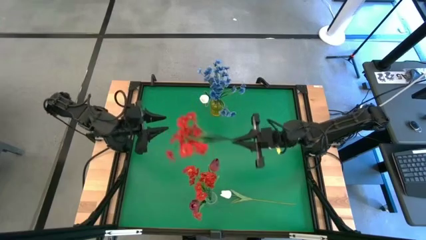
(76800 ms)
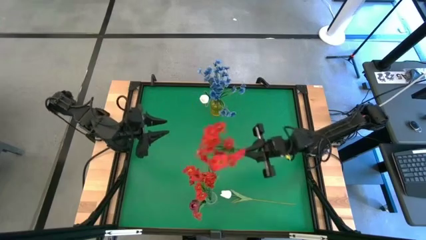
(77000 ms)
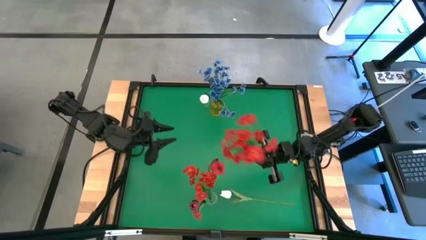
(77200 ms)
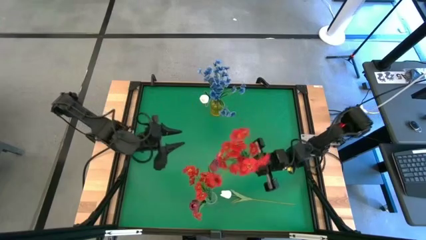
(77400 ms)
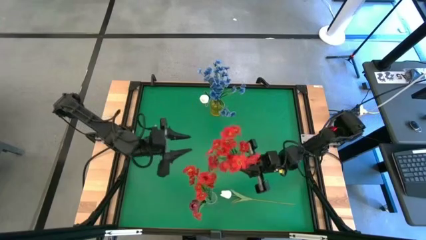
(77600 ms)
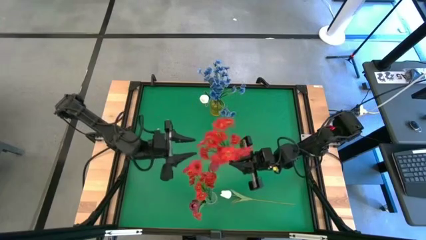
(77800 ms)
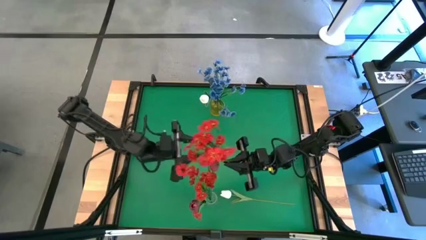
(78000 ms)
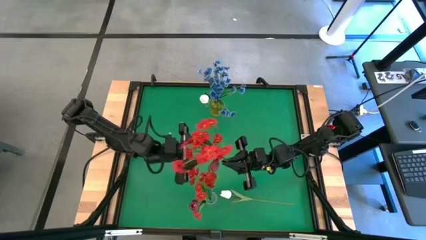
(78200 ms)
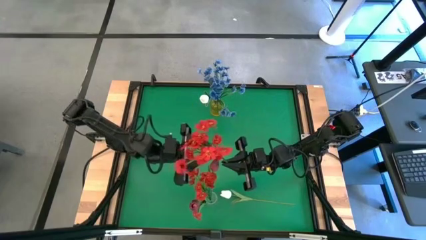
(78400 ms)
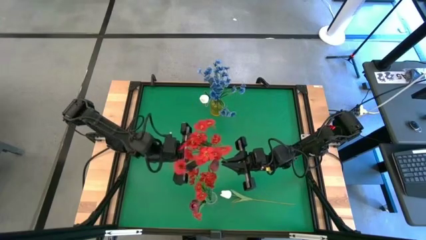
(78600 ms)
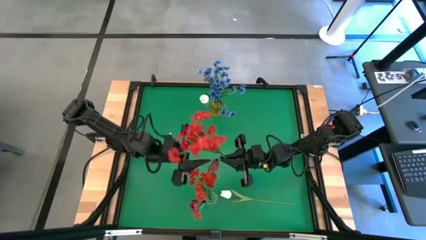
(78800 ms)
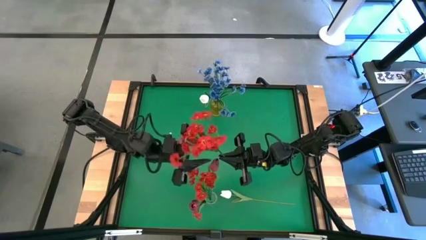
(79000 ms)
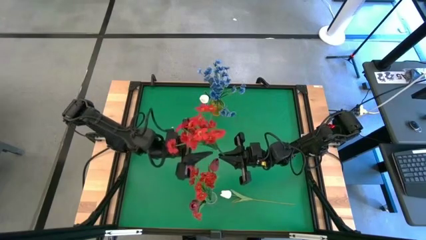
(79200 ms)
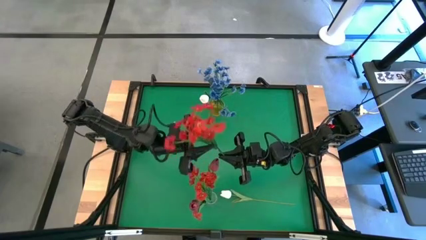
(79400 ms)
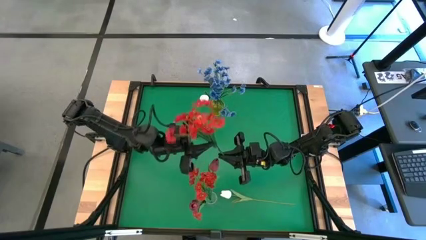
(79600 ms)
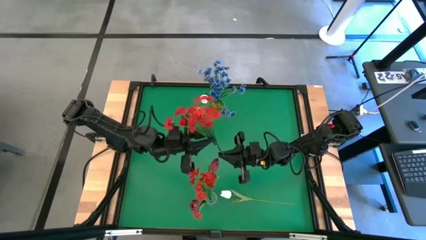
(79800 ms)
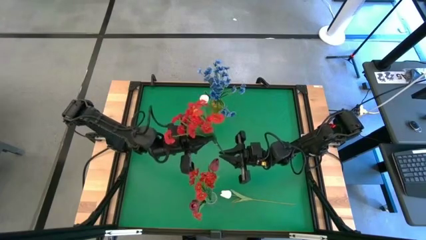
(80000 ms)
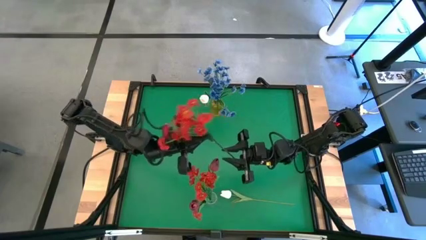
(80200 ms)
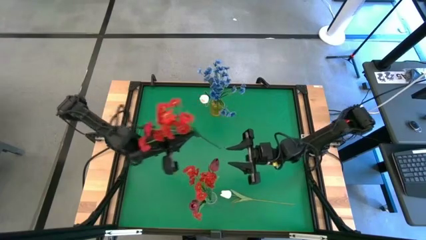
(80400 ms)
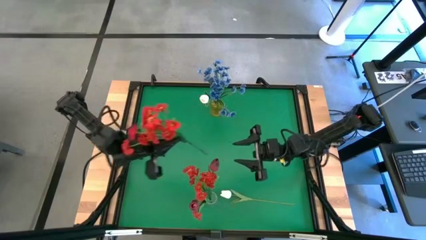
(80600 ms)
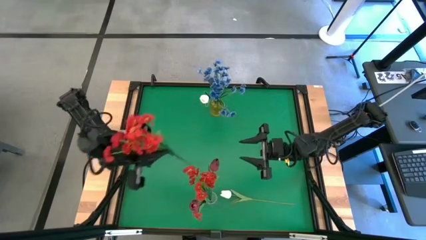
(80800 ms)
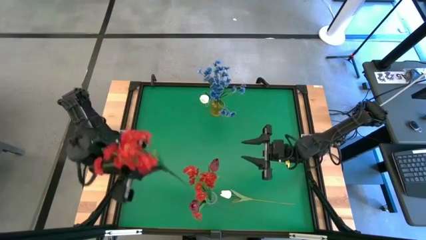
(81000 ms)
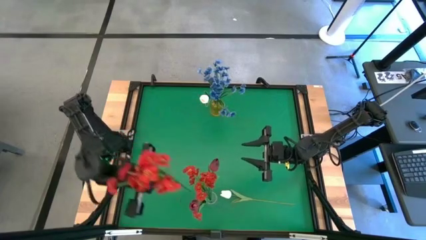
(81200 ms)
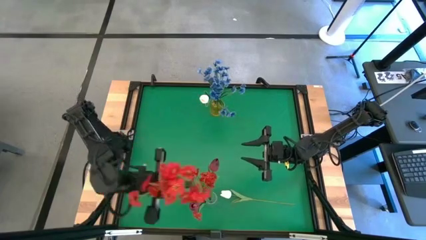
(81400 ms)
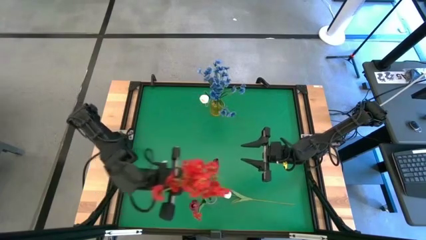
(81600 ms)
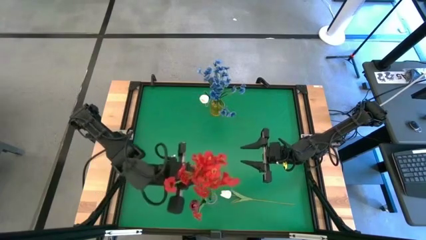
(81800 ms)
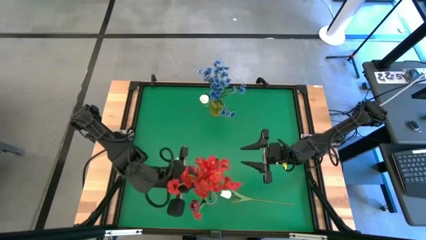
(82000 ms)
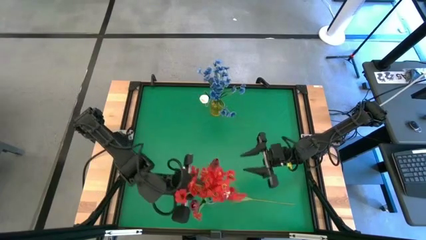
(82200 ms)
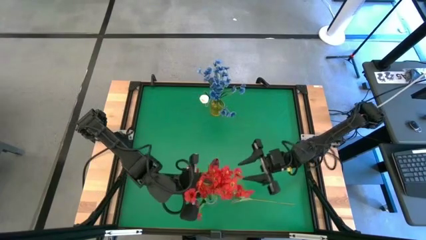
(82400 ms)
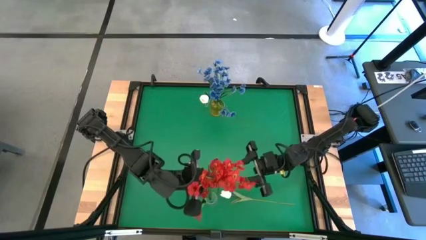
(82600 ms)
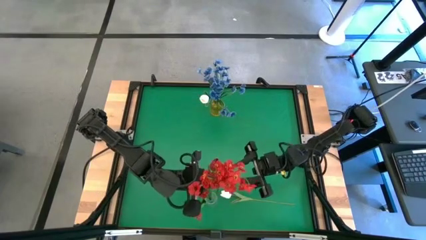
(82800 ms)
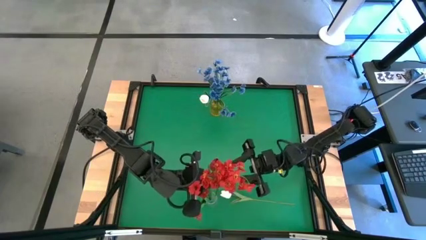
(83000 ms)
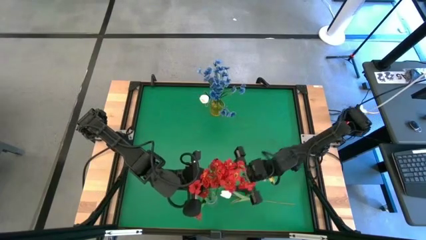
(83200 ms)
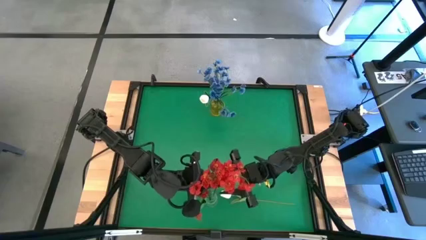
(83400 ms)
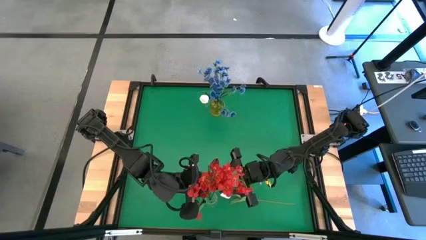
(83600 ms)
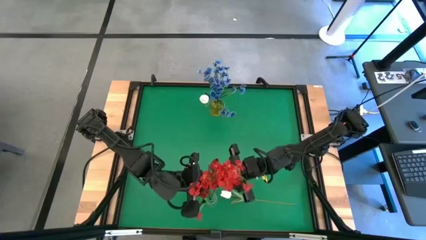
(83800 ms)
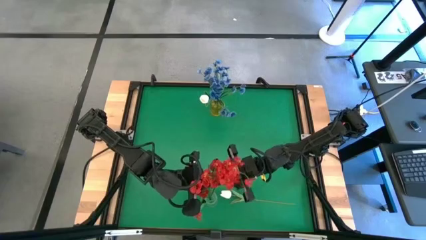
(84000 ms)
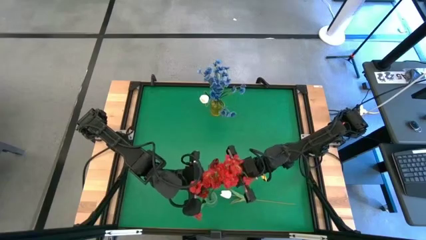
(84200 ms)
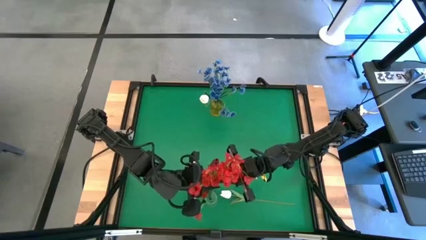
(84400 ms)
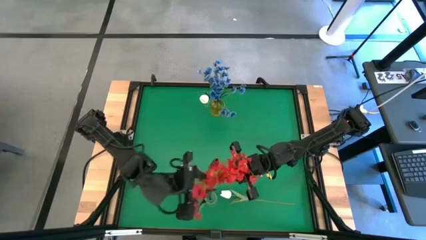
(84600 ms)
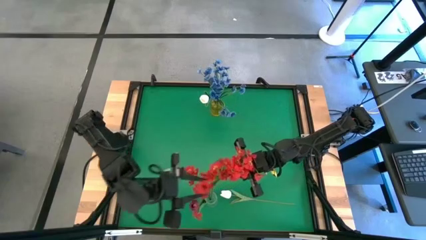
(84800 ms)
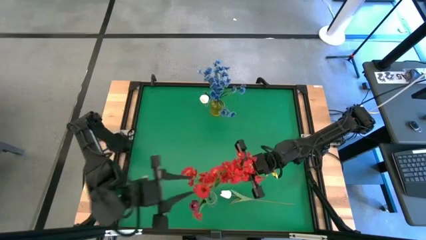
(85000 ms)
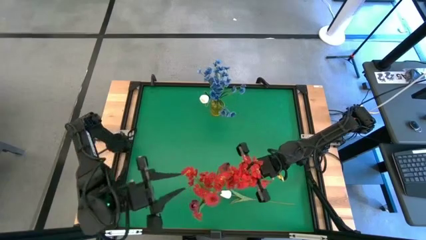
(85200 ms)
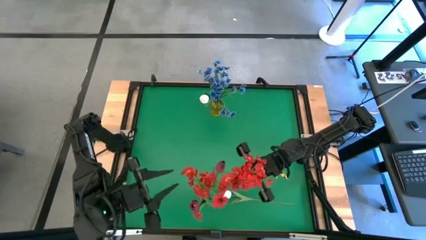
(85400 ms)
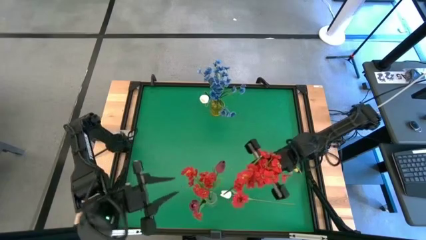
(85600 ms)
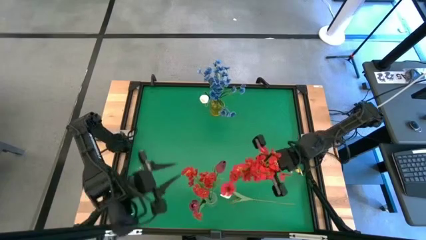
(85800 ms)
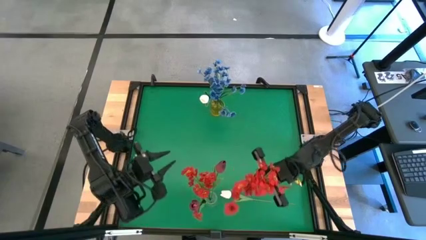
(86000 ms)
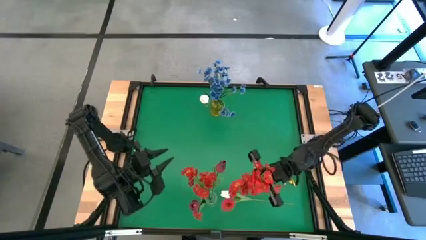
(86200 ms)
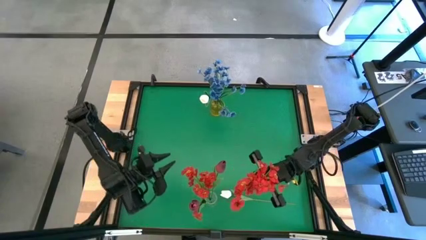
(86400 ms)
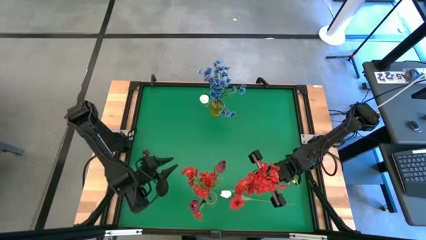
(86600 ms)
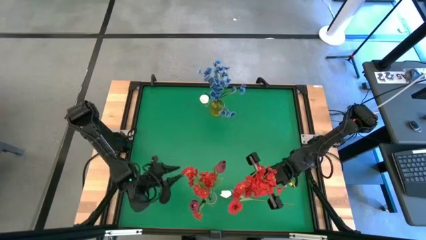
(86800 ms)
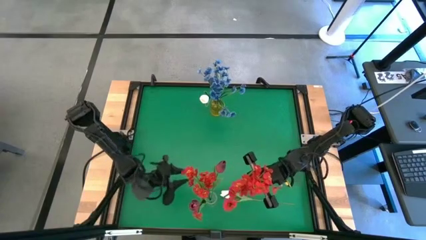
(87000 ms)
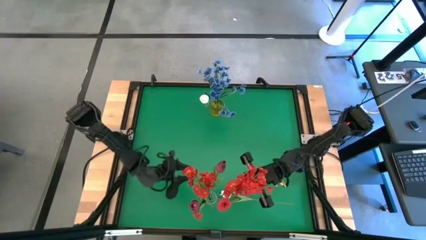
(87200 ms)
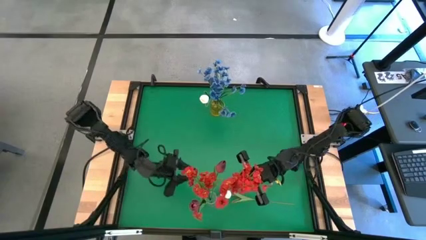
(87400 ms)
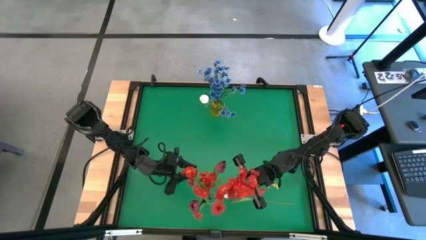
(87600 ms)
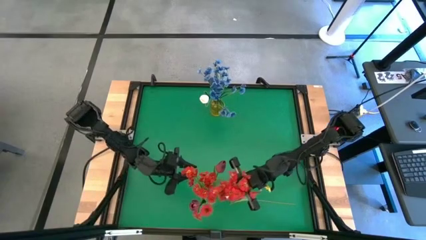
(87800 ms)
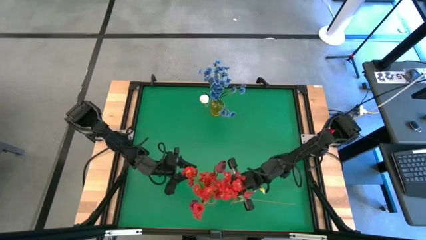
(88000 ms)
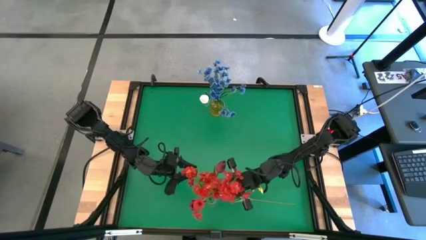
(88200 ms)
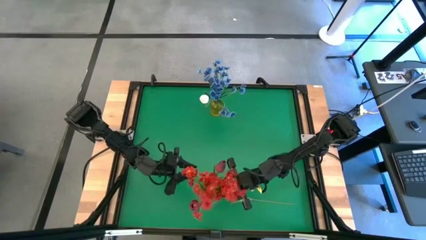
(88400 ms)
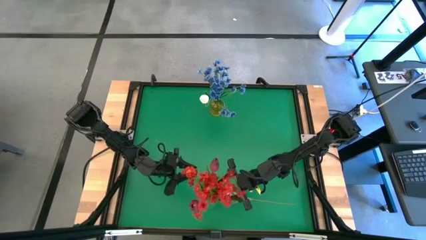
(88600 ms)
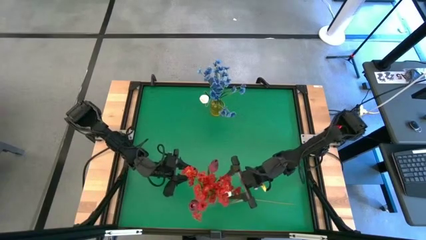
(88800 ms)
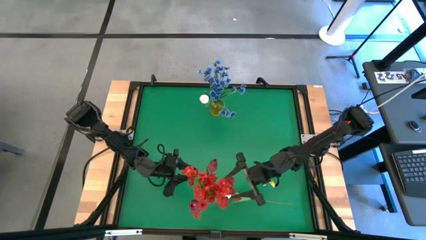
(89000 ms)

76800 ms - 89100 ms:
Task: Sort flowers into vase by color
Put the red flowers into the transparent vase

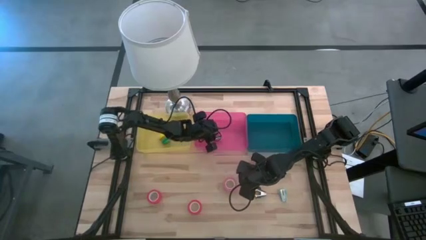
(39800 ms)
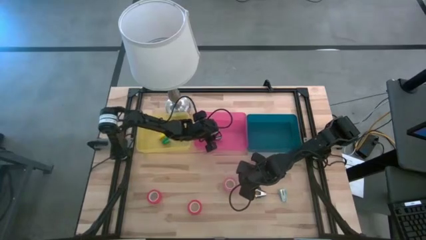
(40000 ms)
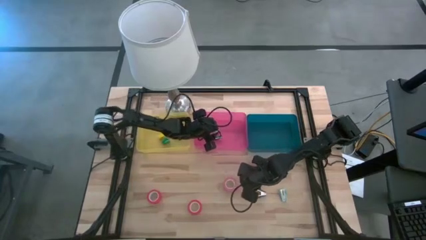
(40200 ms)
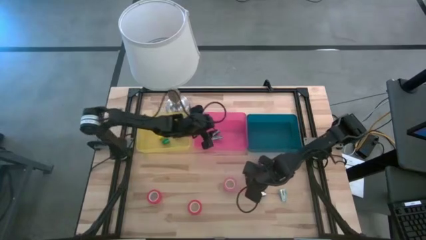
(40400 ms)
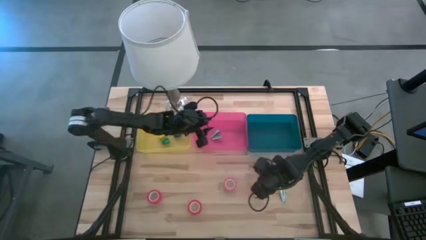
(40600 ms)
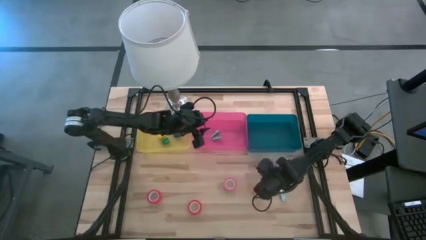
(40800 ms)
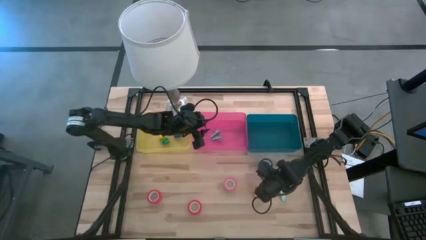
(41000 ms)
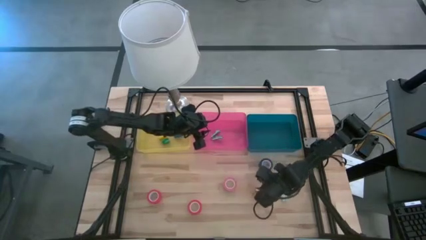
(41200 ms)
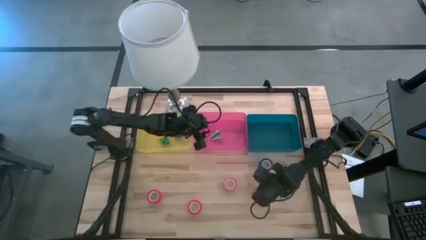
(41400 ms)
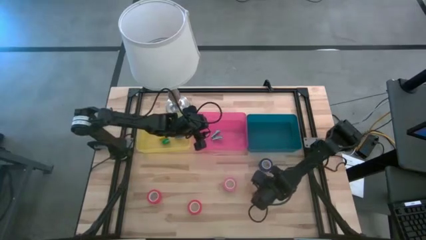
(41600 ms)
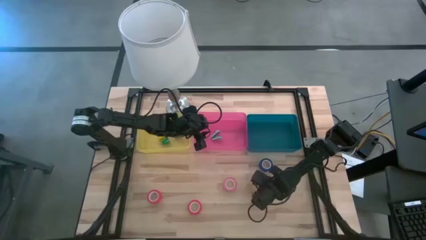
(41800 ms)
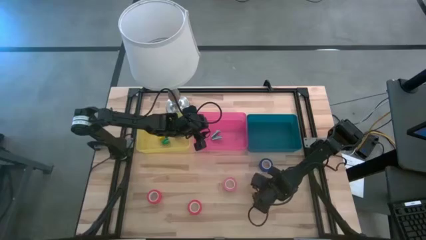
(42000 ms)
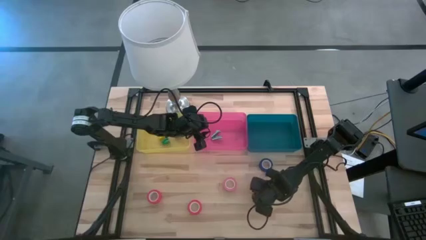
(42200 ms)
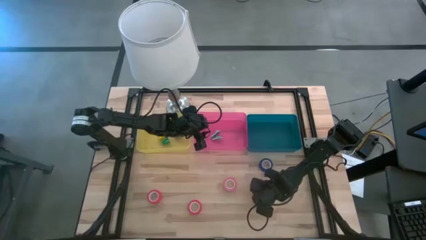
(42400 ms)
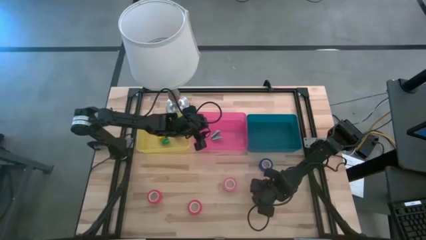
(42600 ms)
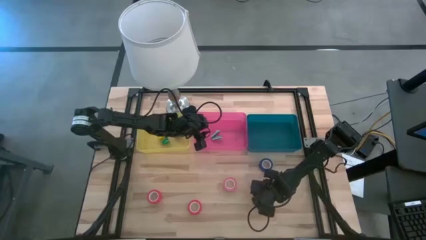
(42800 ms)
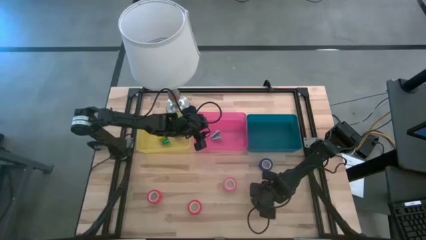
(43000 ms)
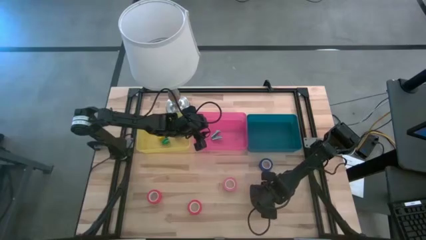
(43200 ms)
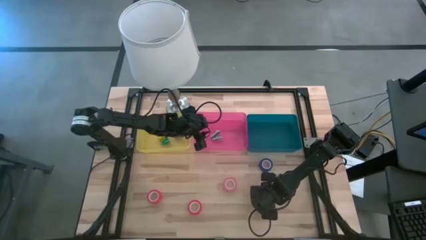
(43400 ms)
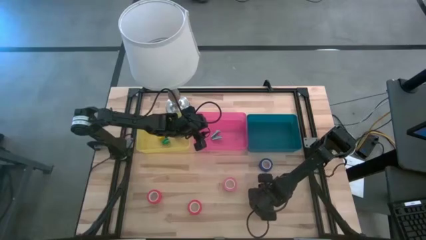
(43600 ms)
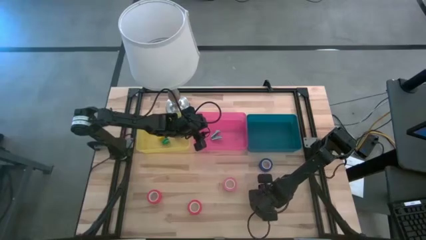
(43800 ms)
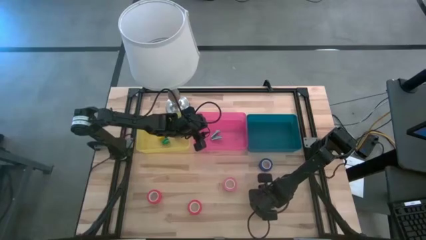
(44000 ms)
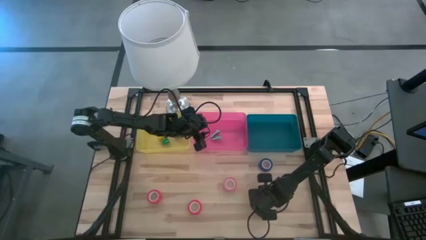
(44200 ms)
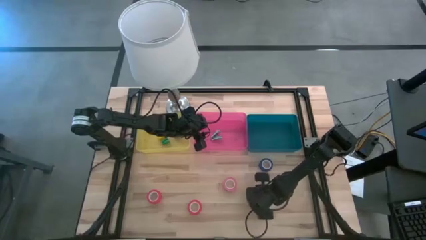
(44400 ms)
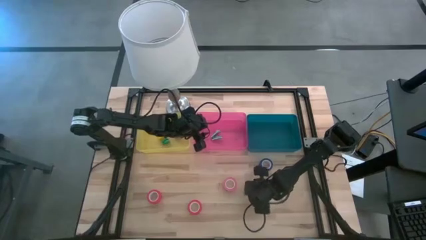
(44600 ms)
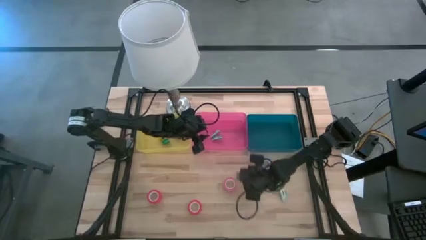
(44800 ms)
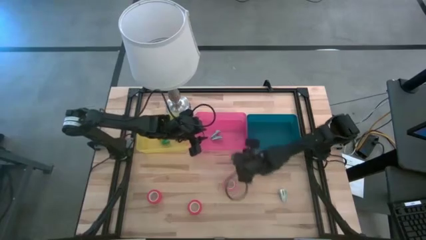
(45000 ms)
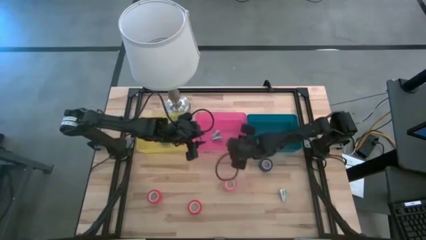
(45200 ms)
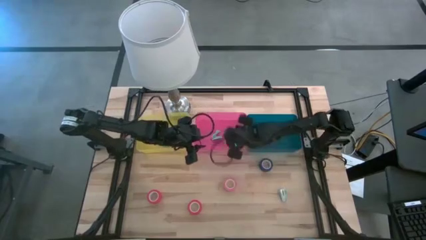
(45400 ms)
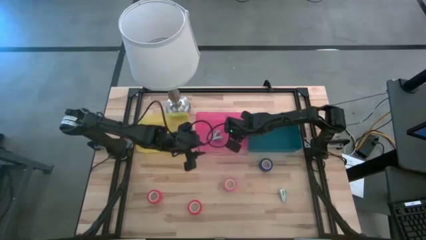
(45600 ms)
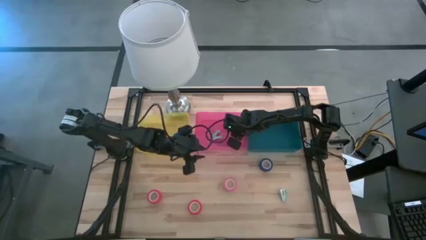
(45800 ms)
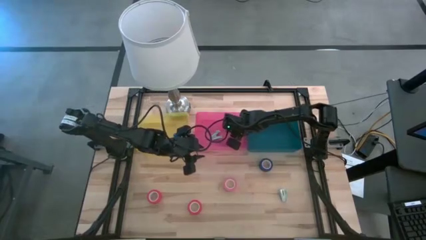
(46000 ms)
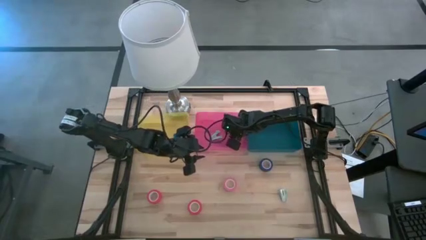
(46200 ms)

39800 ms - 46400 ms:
Task: Pick and place Stapler, Stapler remover, tape
Put the black staple remover into the pink bin
